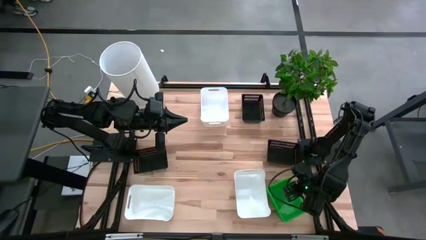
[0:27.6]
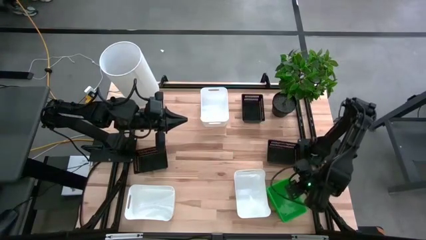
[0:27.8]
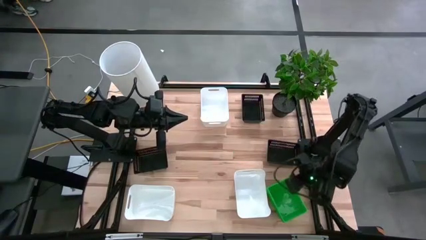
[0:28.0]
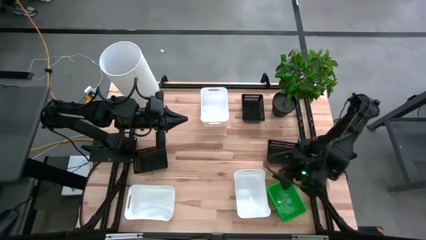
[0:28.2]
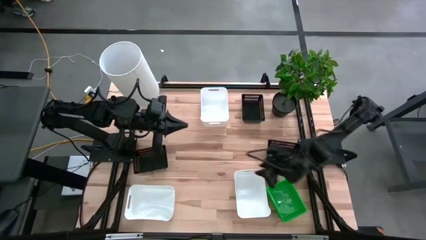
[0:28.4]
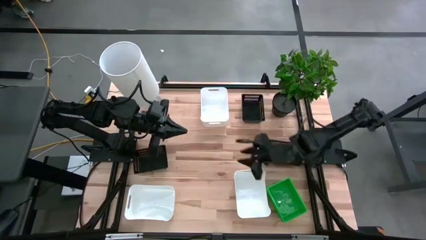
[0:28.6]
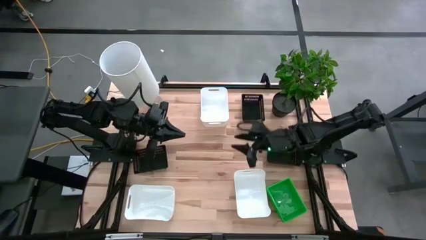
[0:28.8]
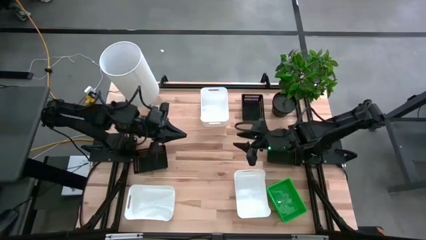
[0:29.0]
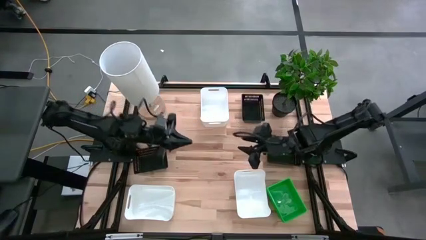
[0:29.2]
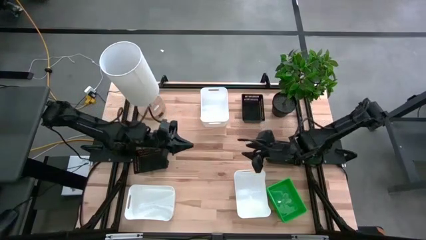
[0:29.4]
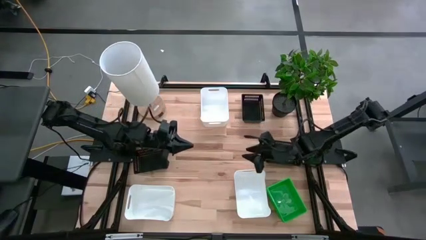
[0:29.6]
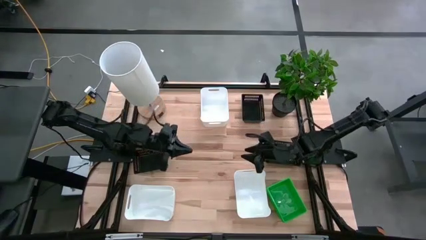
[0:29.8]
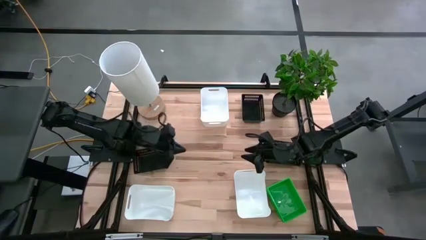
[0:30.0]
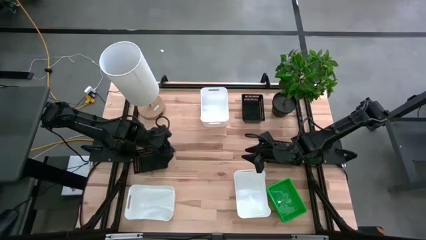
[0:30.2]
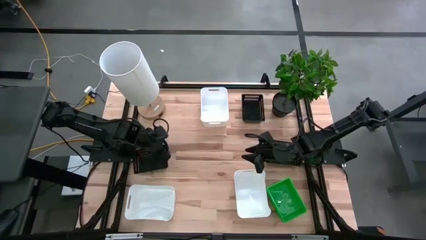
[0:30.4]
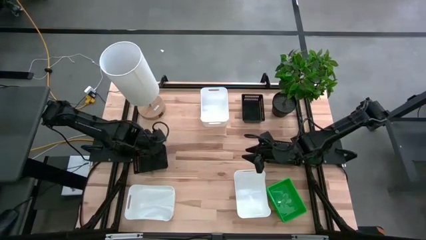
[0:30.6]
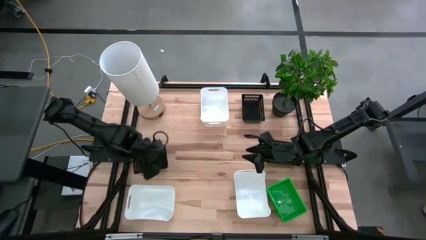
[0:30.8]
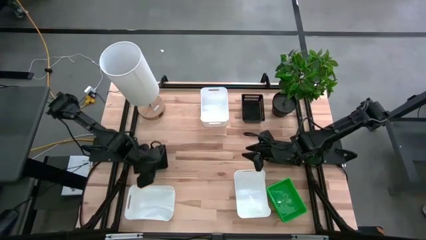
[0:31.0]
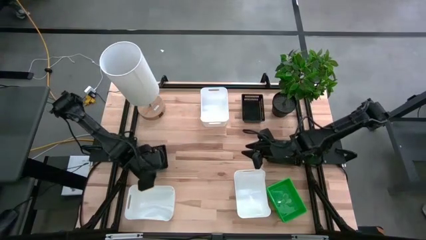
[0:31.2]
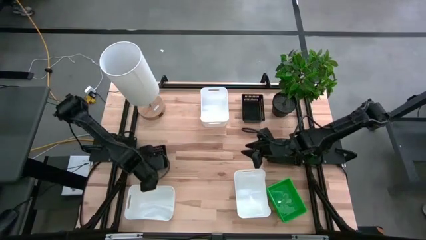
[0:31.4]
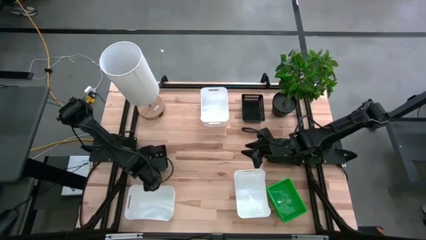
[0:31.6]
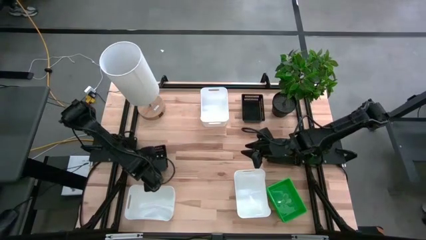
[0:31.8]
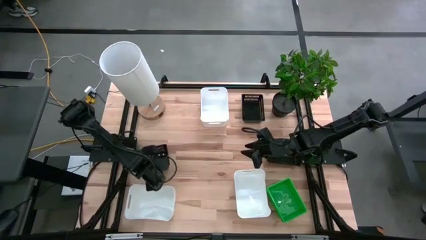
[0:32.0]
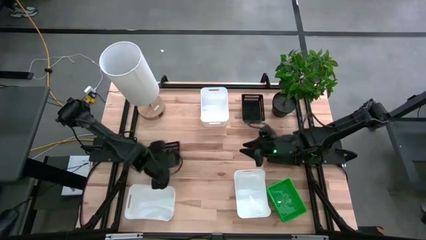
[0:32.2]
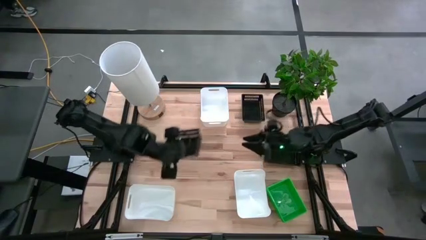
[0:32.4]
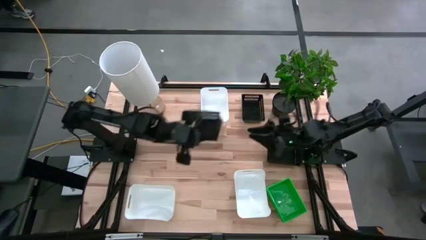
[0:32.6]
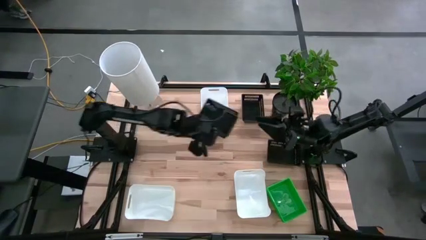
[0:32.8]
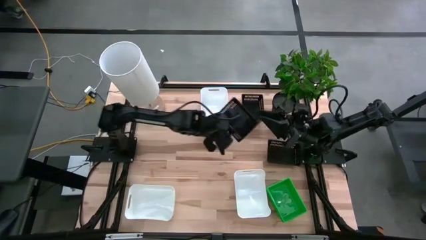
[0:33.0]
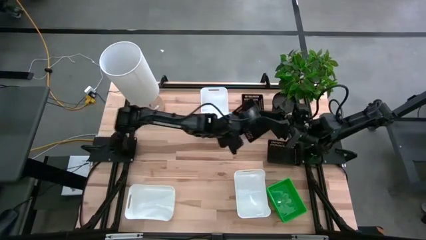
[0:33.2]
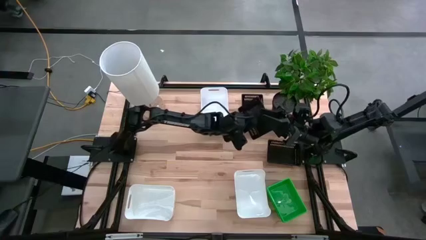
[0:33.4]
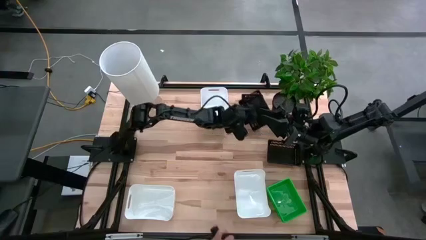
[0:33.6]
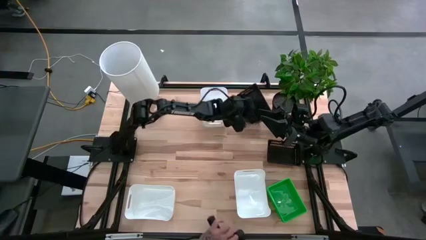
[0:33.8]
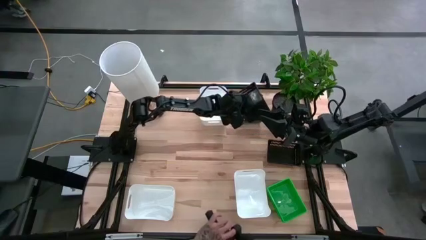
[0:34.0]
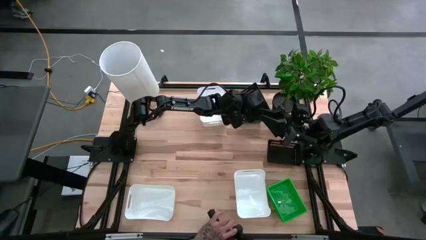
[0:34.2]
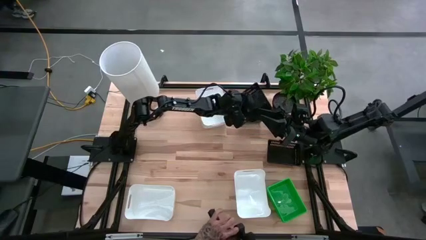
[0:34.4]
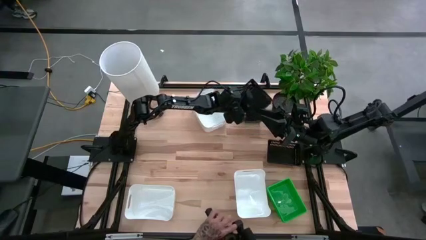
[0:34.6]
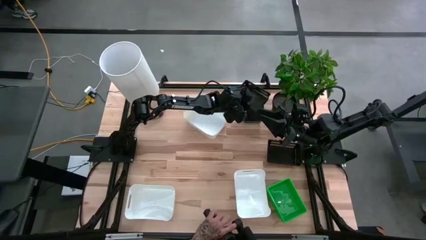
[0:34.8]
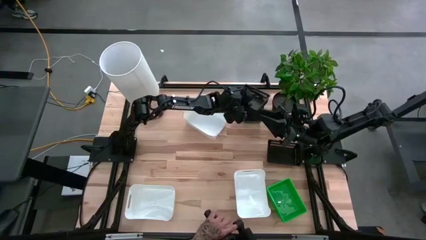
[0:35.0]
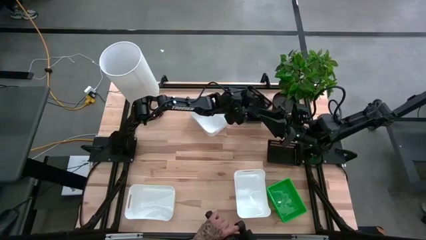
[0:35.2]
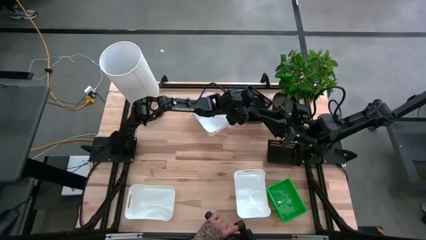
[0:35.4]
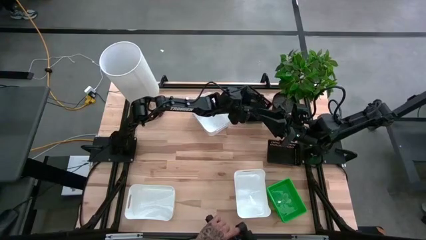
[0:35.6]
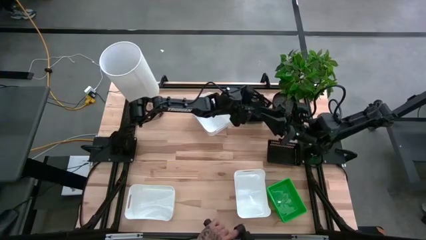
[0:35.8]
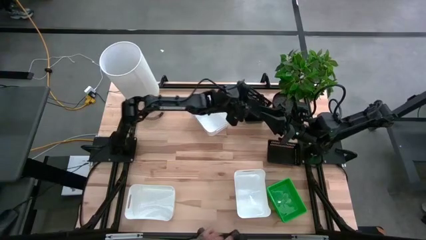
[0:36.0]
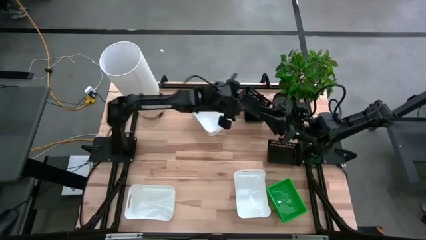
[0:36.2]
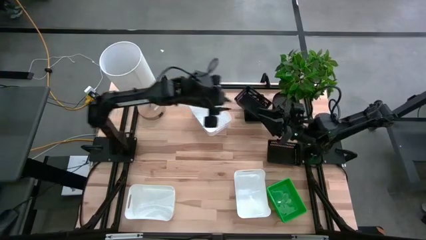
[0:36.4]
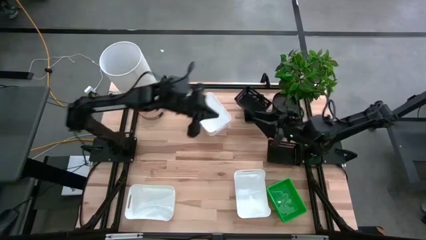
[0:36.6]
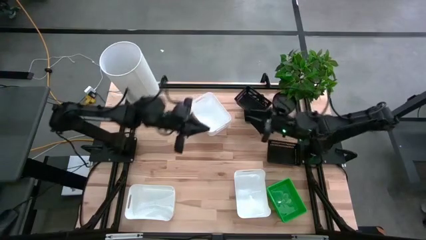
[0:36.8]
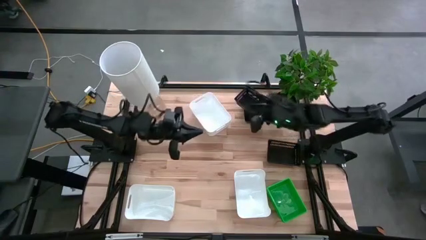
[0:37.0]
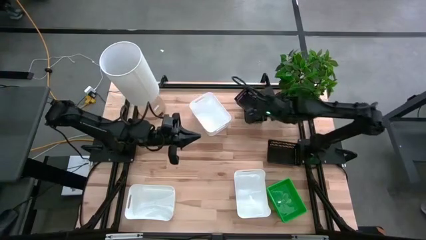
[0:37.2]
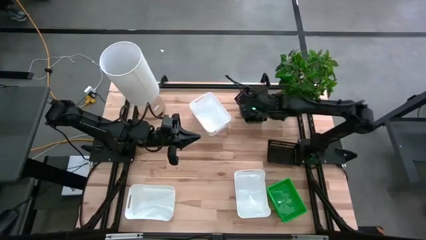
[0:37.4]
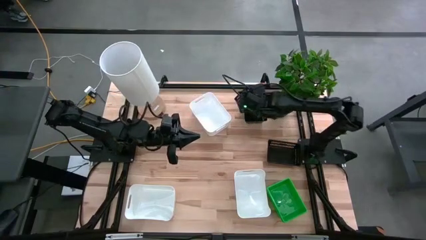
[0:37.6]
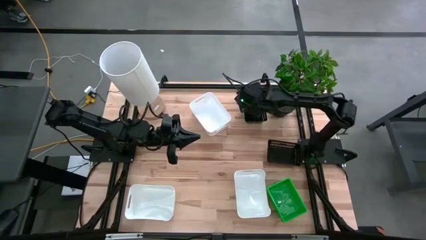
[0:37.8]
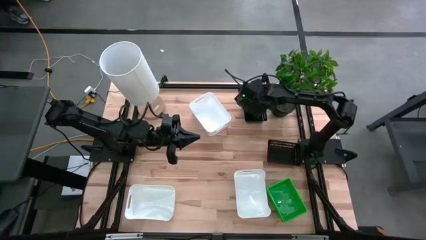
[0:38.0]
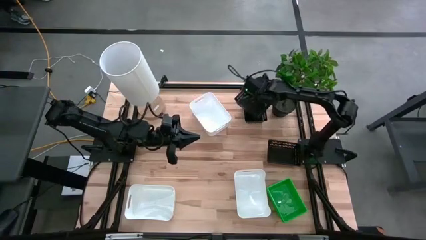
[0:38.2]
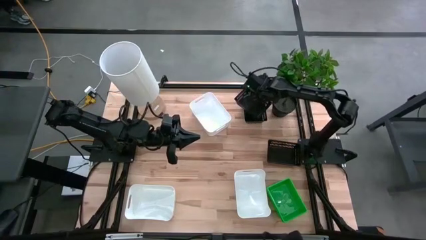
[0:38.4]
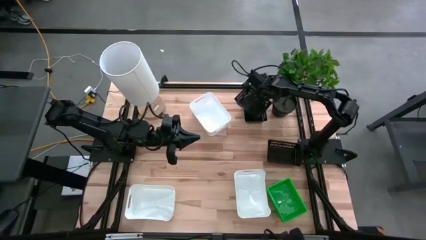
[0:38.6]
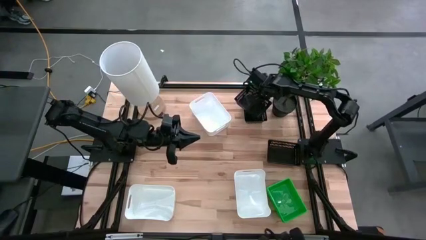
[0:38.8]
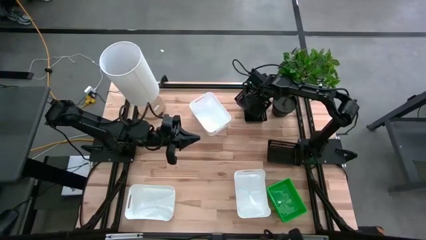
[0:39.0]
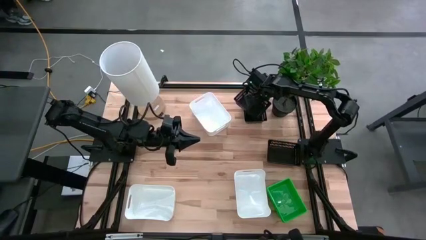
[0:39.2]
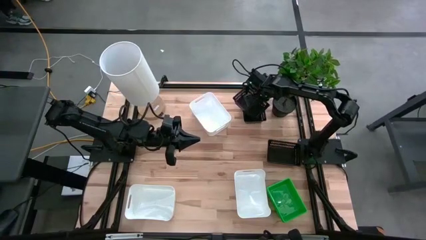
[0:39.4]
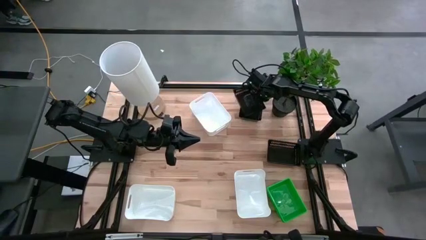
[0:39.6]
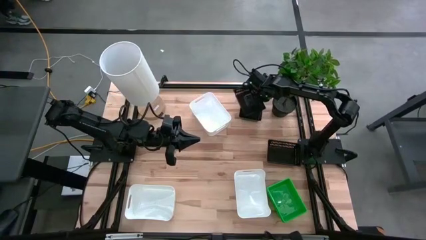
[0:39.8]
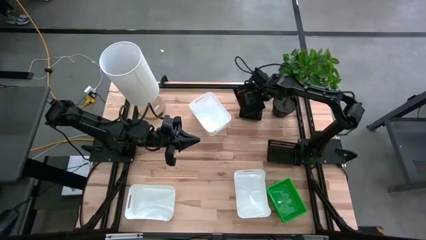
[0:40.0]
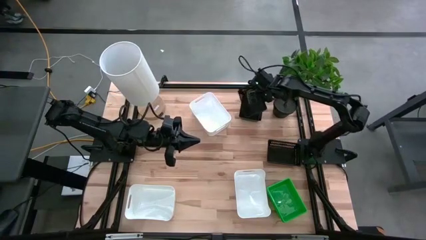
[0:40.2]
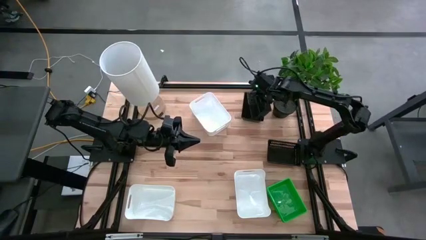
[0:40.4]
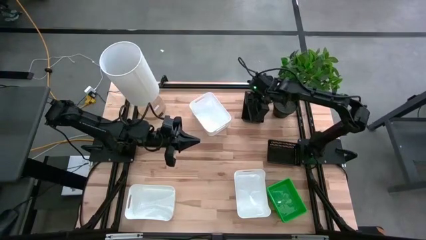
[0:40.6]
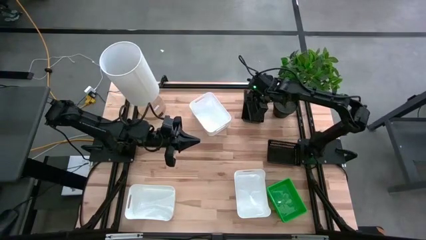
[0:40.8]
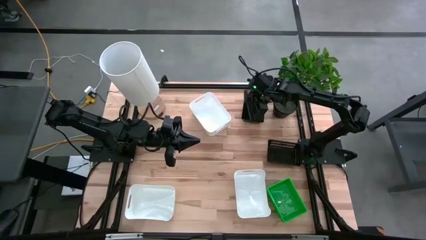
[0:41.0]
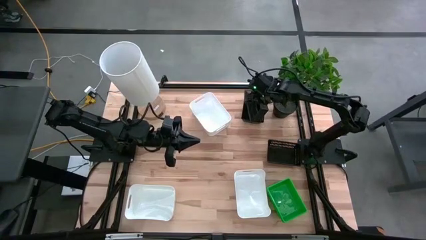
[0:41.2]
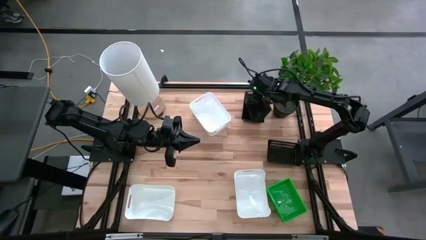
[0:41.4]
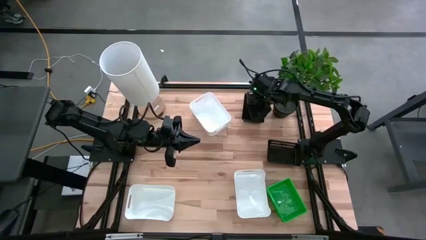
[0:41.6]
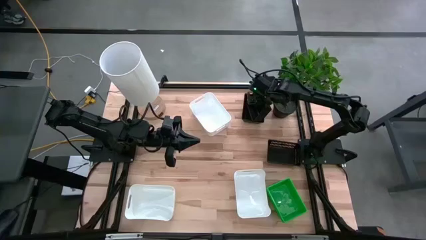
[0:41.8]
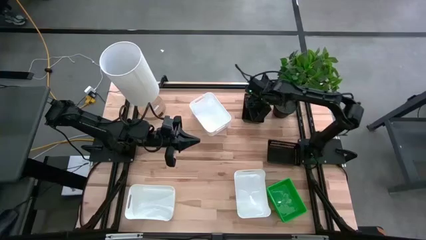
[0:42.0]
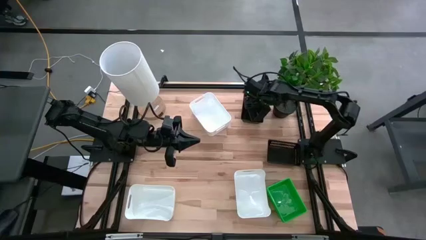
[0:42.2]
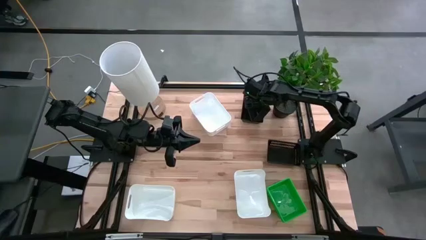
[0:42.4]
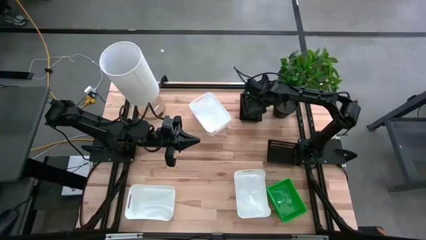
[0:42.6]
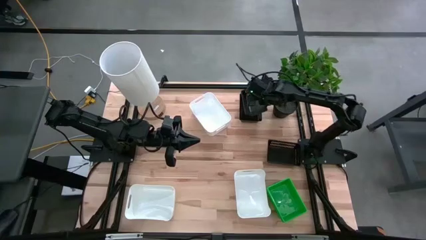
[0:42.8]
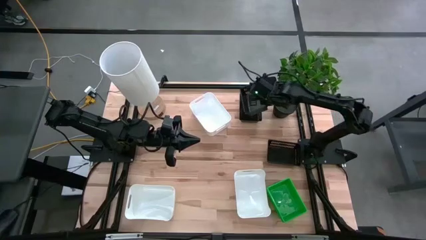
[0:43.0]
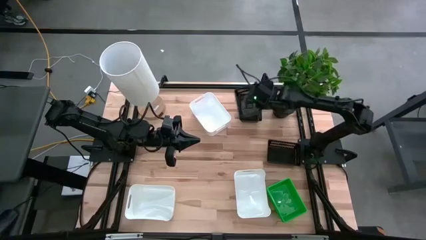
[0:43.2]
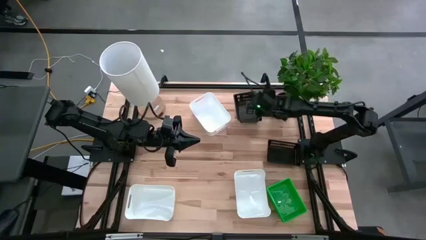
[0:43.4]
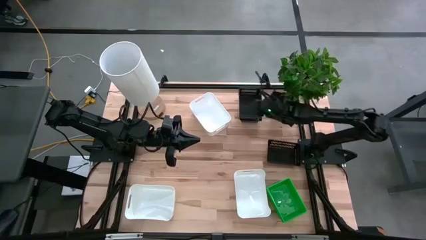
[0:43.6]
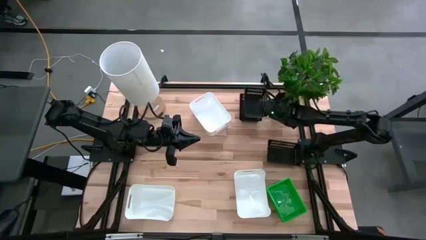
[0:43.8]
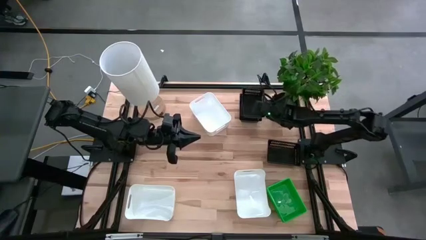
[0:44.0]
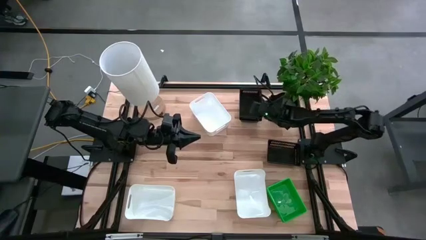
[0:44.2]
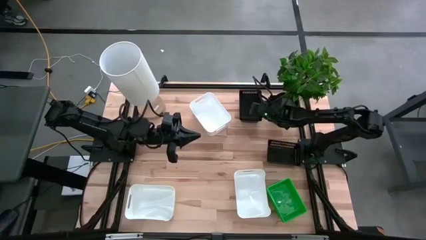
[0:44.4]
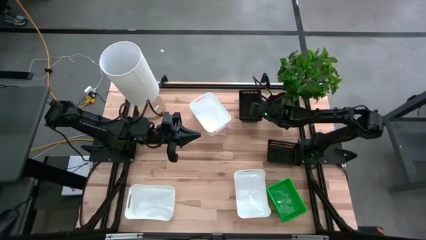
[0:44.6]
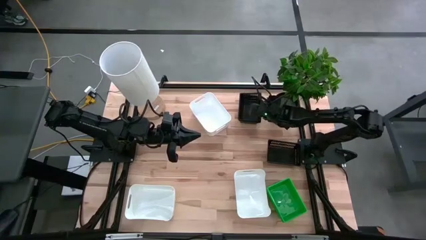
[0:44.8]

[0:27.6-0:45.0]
Stack the bottom left black bin on top of the top black bin
